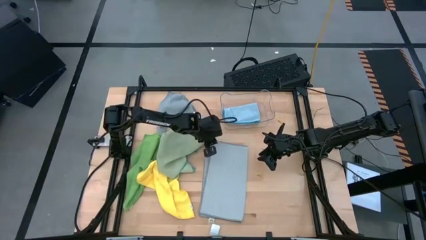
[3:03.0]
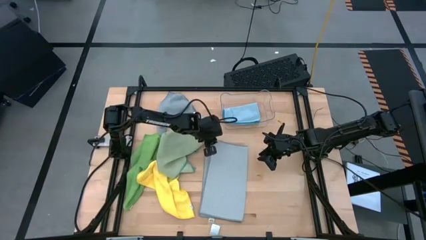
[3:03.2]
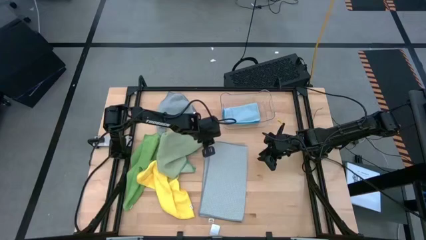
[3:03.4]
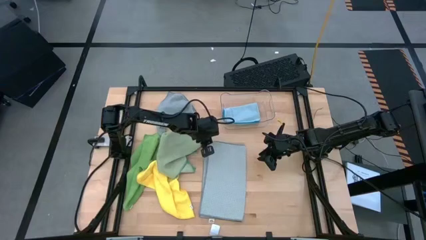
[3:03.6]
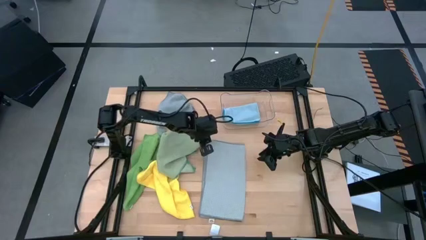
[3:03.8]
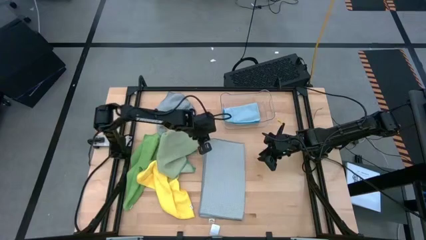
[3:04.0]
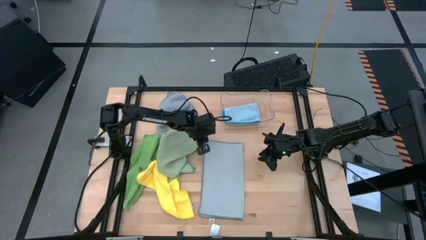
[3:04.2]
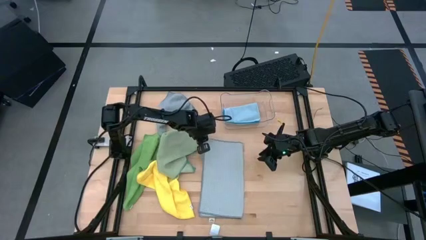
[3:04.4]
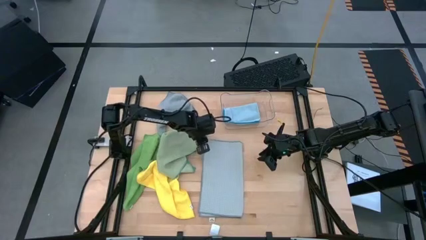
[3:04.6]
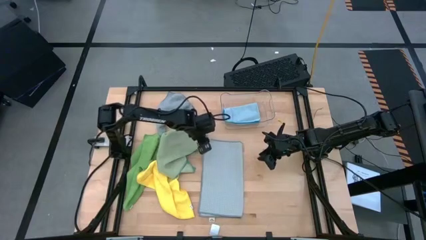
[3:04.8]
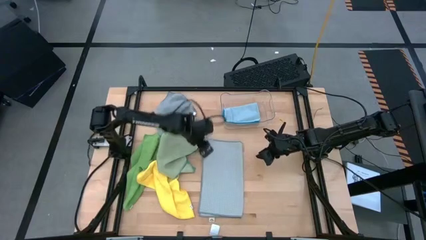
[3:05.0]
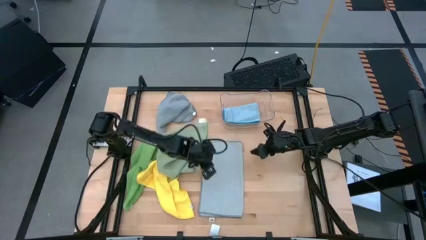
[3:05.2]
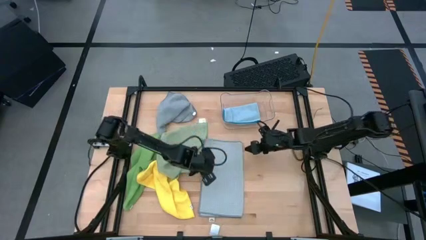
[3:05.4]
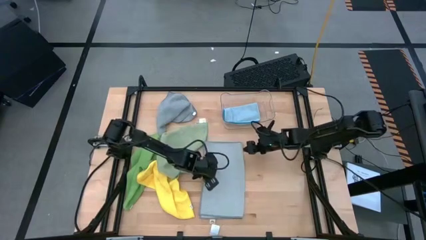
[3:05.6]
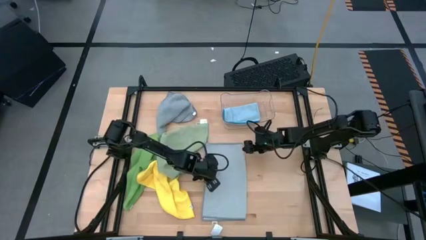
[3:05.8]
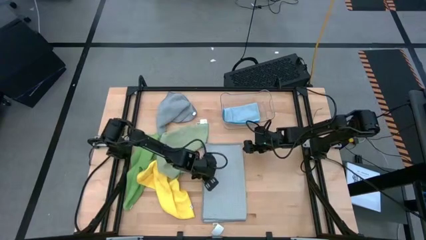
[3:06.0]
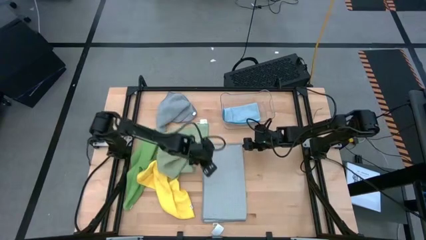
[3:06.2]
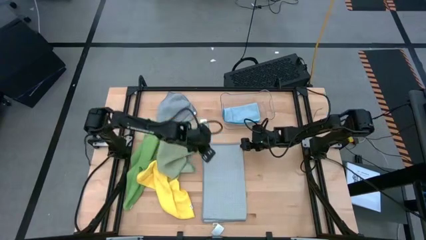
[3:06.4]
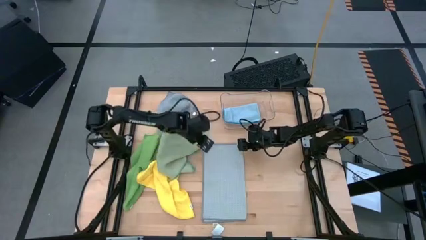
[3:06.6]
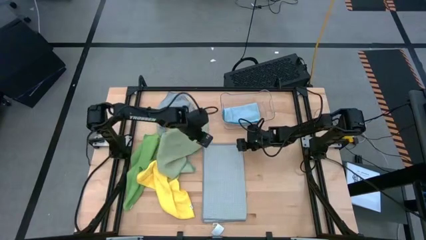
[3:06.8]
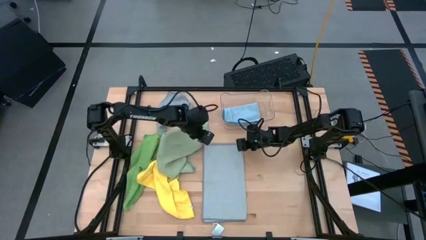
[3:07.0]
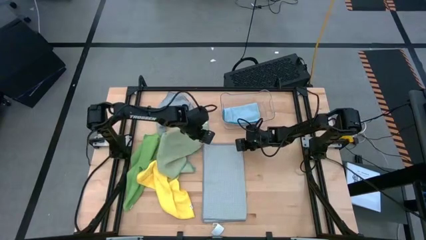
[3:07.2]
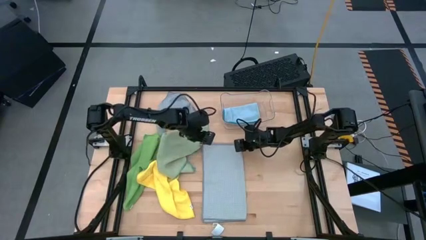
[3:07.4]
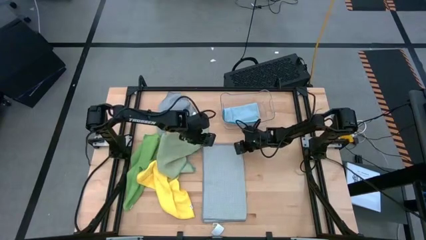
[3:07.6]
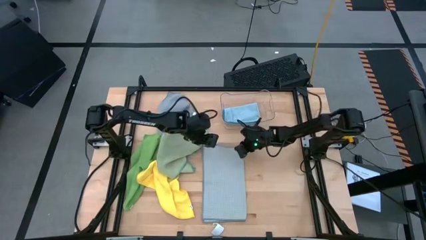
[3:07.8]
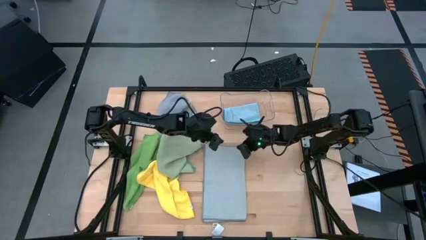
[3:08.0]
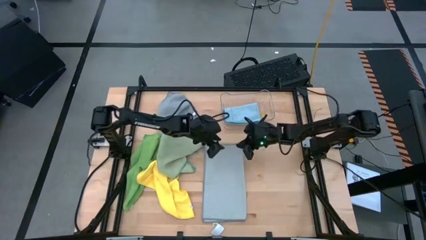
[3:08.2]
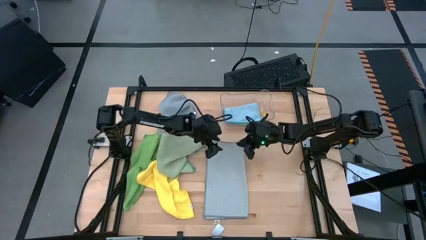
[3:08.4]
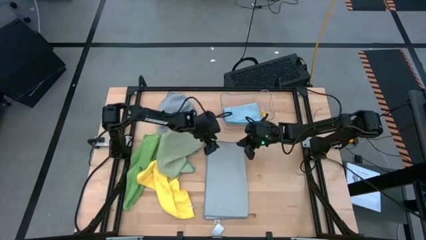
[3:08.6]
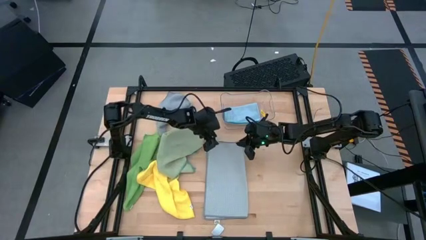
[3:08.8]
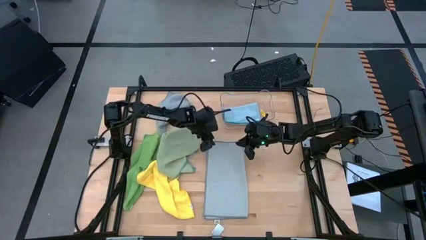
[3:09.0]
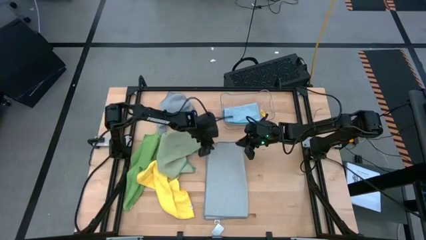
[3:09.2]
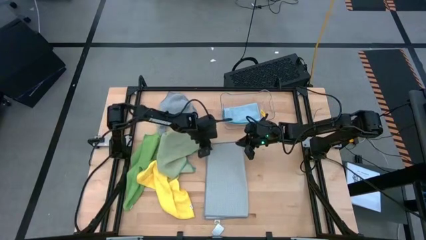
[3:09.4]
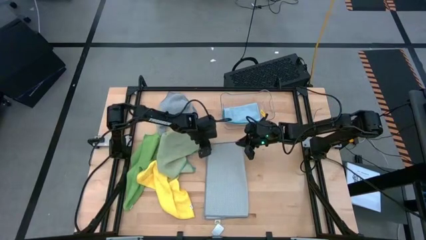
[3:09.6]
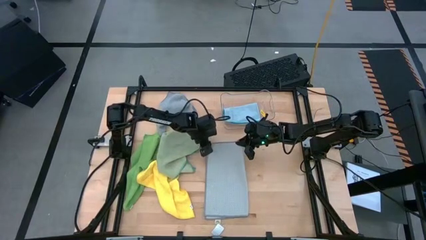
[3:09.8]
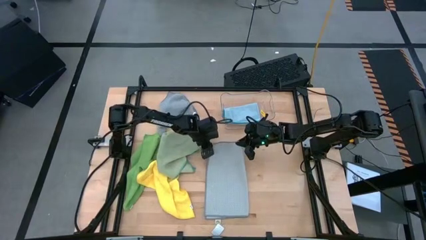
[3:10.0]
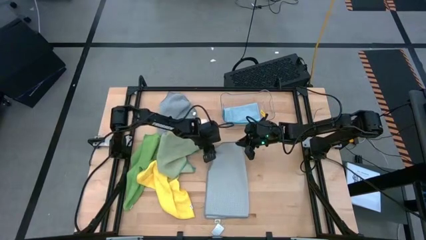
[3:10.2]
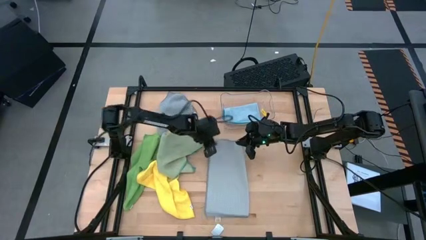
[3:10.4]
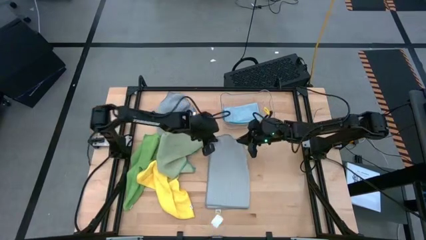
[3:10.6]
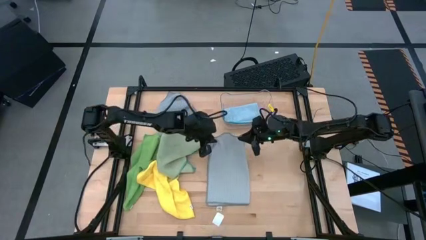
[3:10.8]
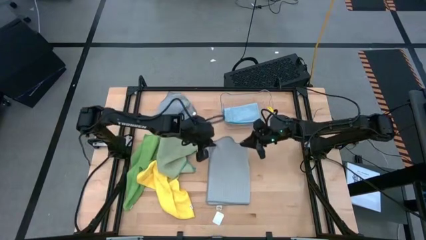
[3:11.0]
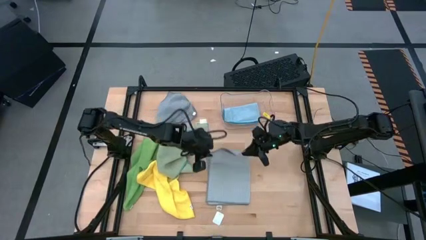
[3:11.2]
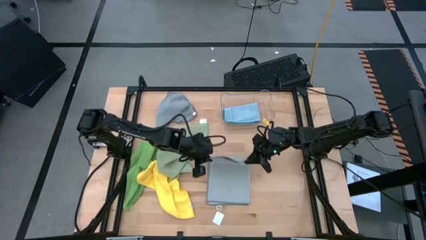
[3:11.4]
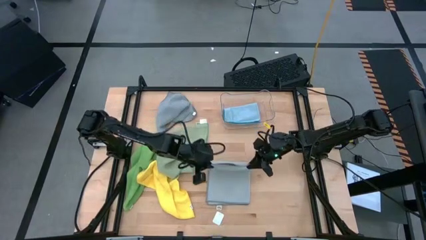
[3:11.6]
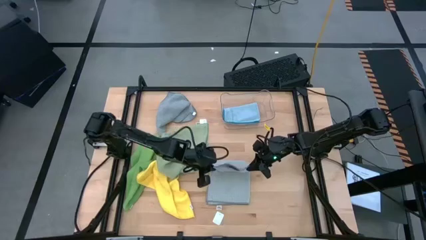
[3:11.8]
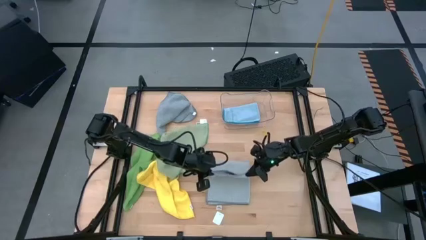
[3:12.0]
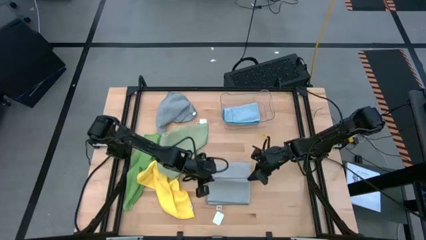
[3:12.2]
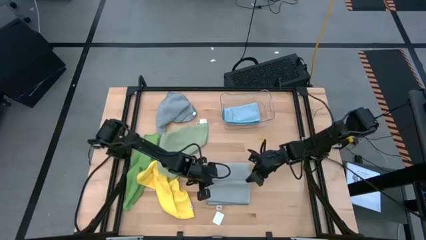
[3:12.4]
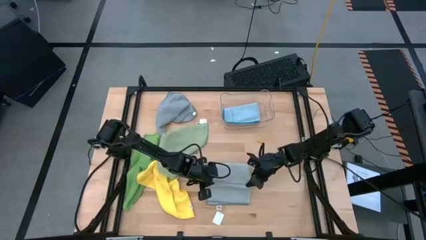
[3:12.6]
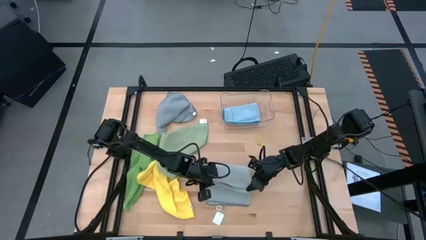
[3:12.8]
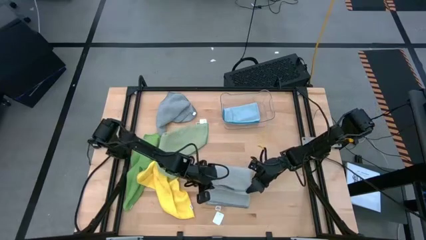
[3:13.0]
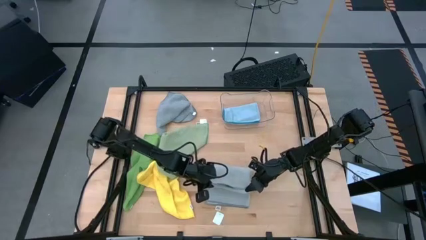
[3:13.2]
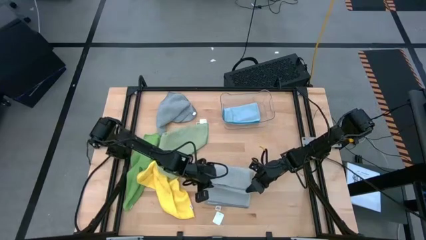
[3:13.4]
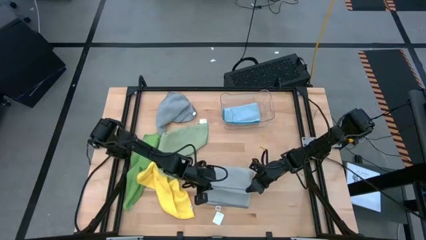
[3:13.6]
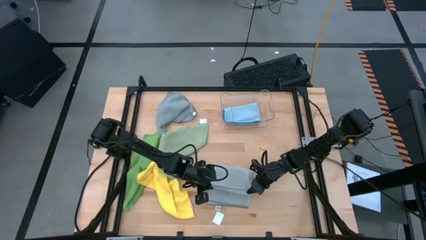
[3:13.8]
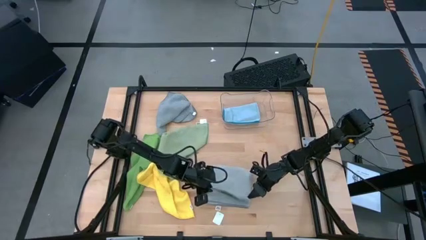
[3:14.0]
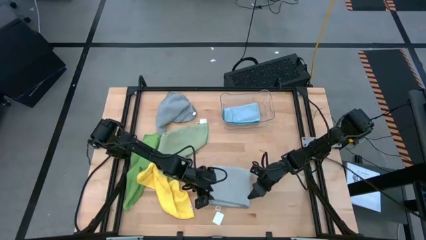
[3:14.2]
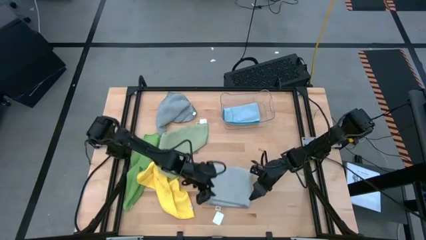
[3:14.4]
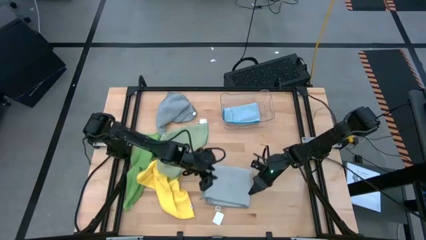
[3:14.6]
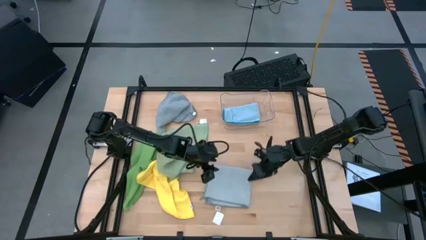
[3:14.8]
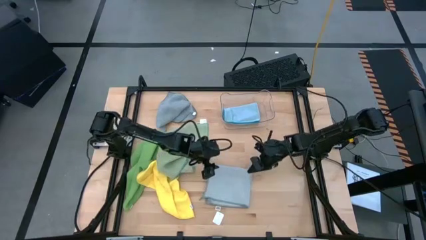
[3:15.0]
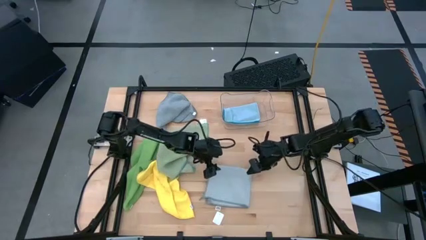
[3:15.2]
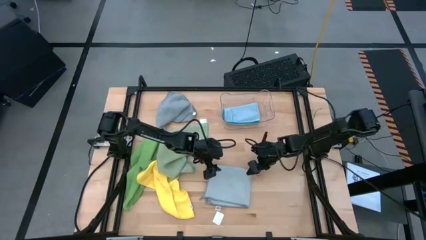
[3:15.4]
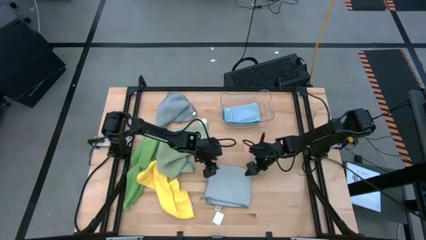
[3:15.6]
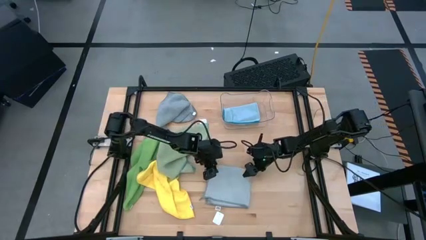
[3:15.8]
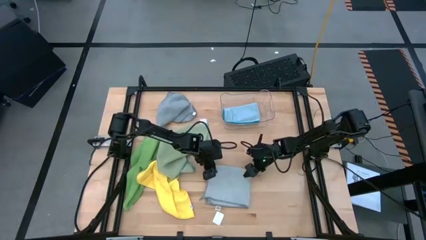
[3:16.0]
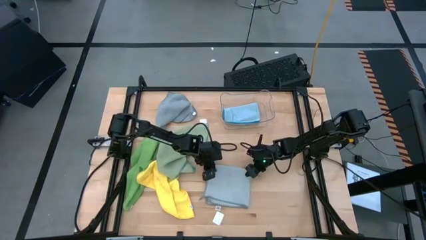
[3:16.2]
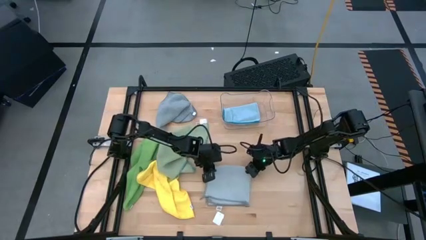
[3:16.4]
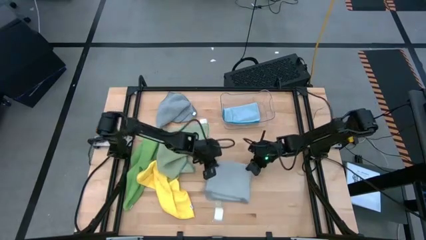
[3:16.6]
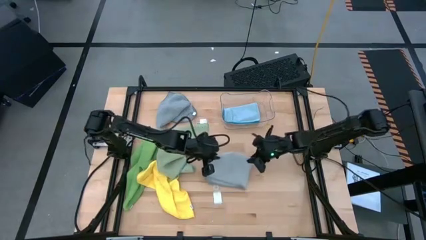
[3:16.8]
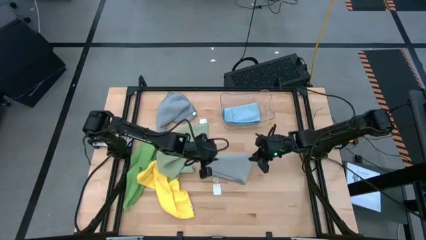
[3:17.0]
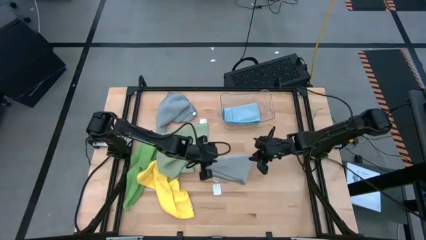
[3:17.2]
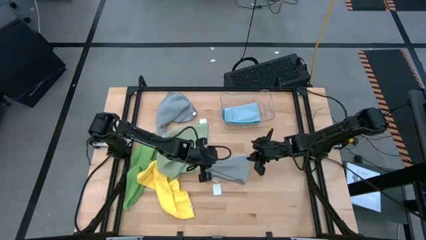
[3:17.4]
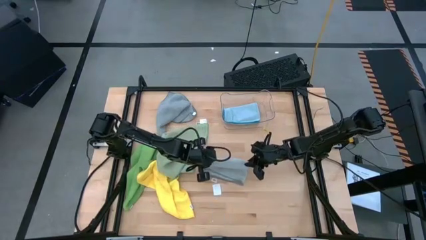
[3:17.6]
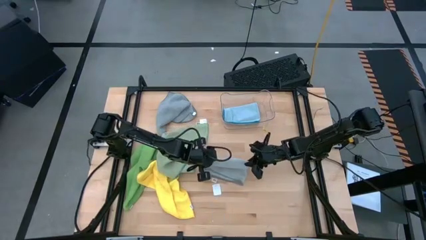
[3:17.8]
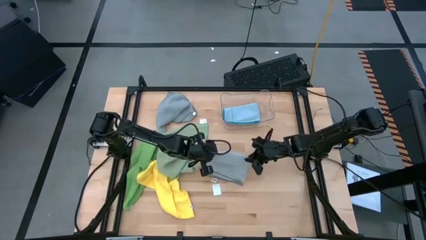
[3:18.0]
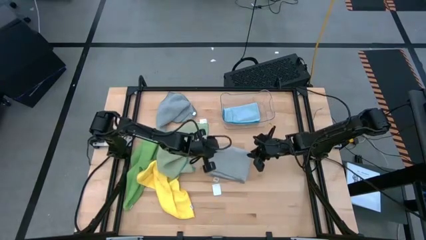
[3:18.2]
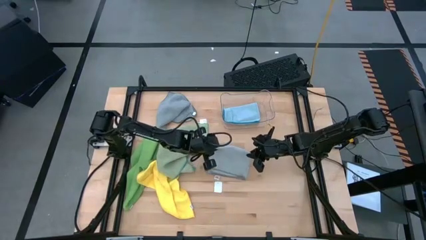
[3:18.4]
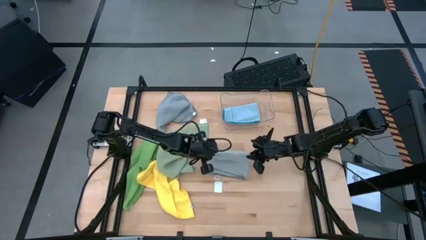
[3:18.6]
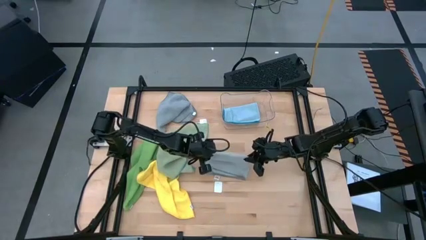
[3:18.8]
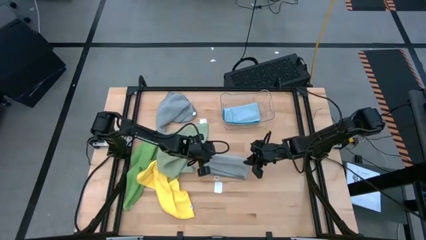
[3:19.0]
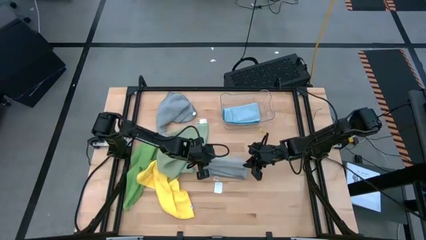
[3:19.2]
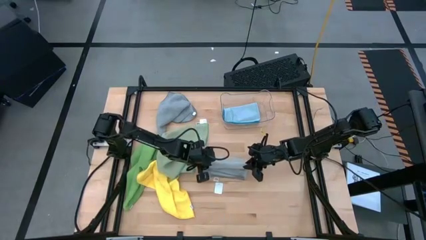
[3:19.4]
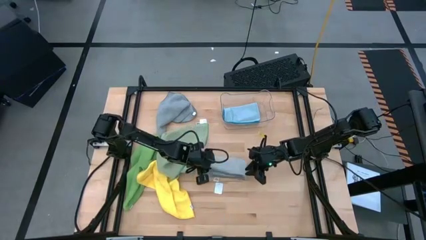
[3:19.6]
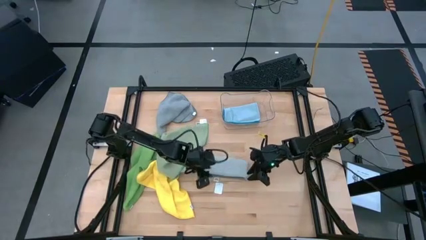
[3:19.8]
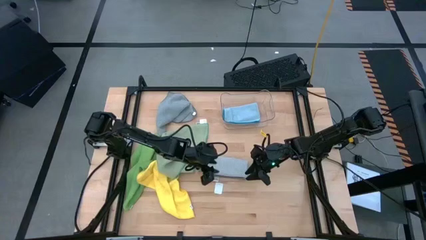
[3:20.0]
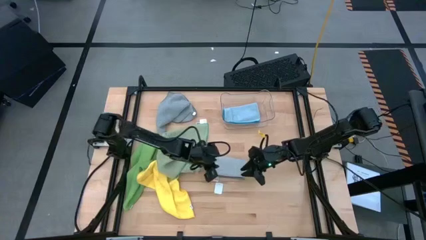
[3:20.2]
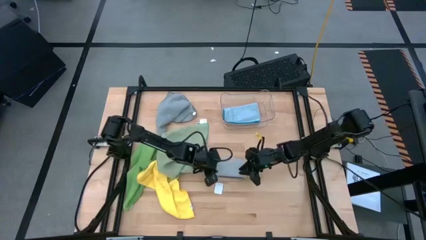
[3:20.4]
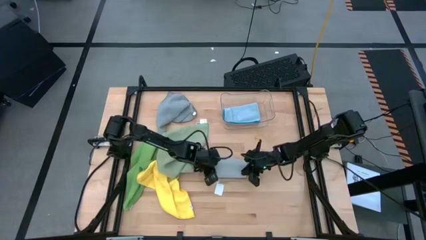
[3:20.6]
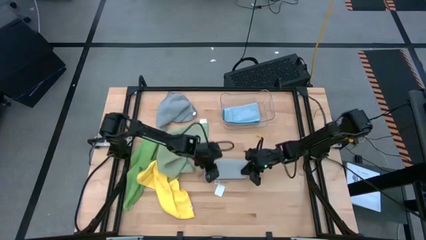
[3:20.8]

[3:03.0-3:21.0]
Task: Fold microfiber towels
Fold the light gray towel
